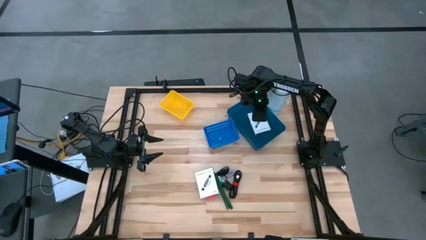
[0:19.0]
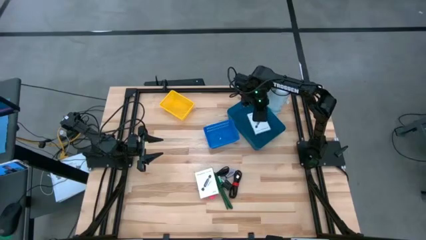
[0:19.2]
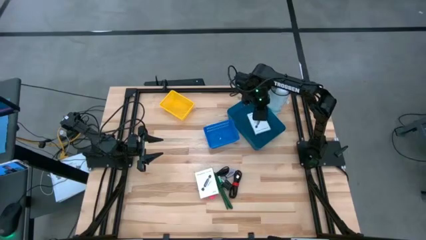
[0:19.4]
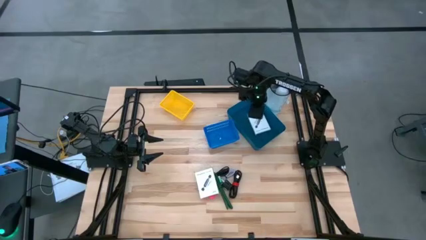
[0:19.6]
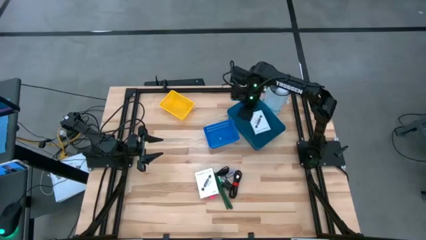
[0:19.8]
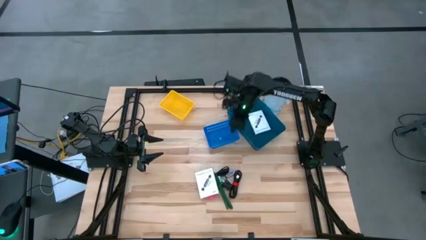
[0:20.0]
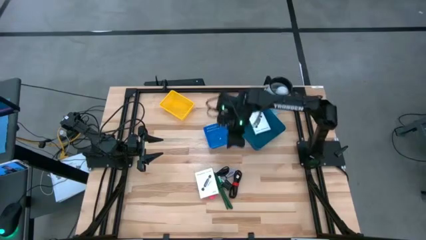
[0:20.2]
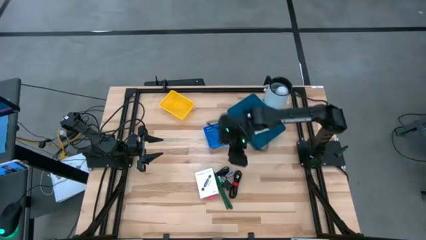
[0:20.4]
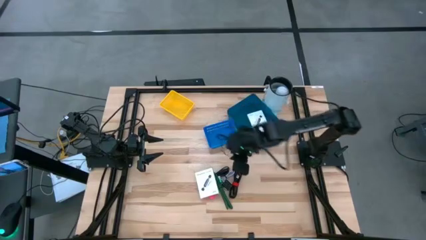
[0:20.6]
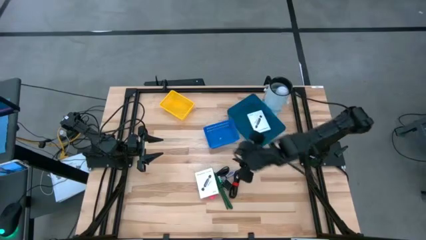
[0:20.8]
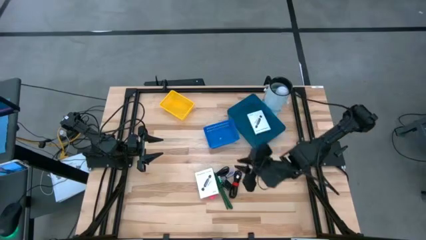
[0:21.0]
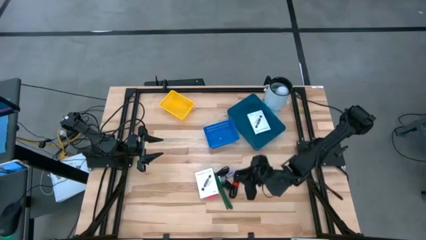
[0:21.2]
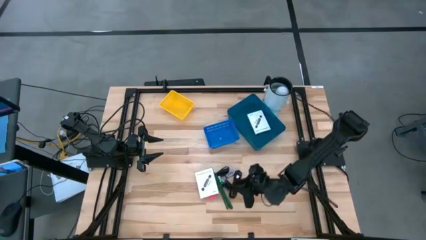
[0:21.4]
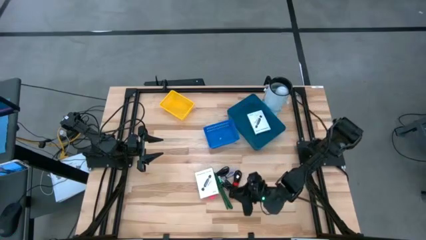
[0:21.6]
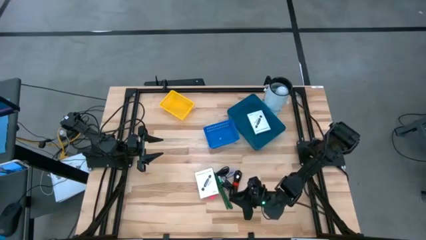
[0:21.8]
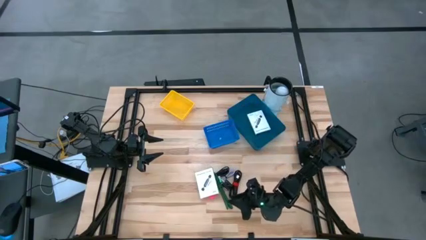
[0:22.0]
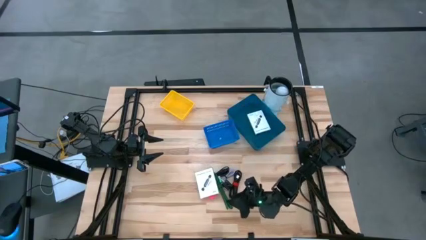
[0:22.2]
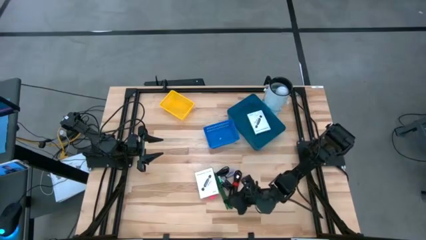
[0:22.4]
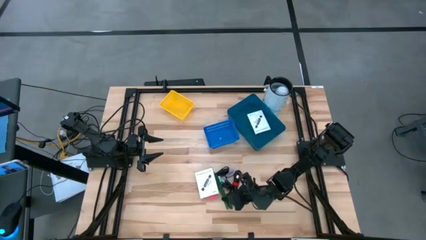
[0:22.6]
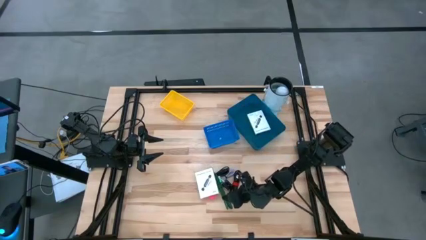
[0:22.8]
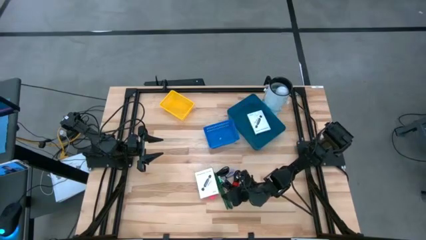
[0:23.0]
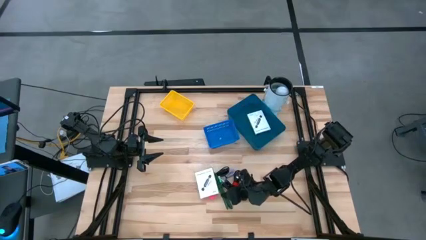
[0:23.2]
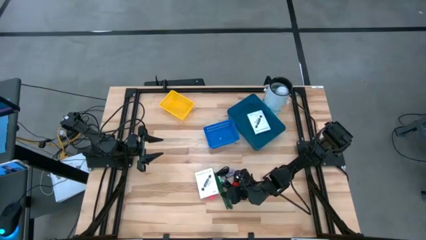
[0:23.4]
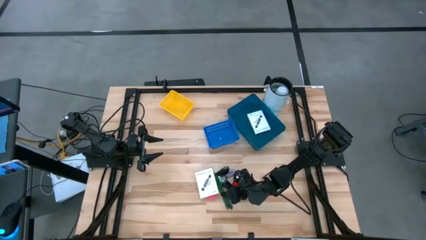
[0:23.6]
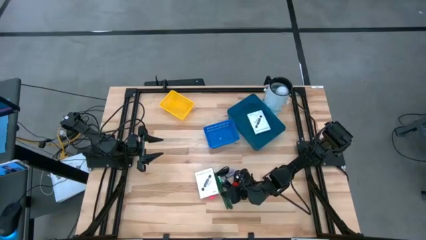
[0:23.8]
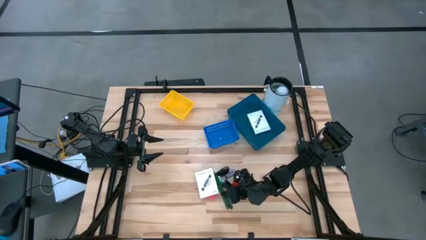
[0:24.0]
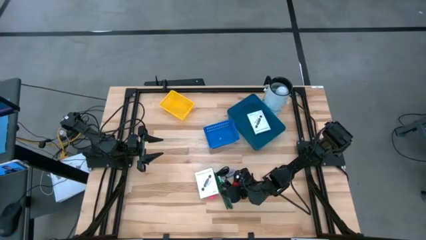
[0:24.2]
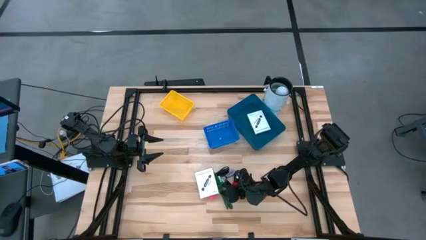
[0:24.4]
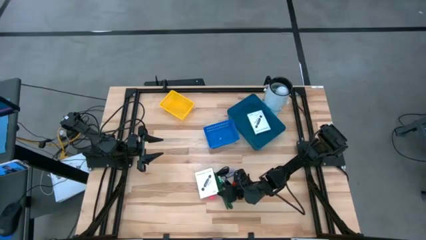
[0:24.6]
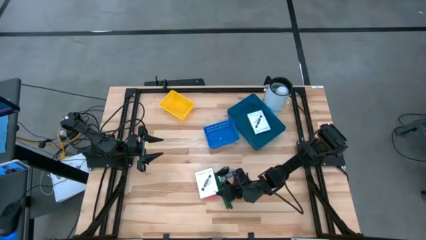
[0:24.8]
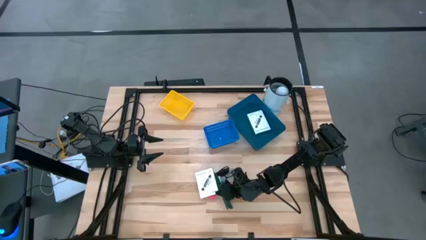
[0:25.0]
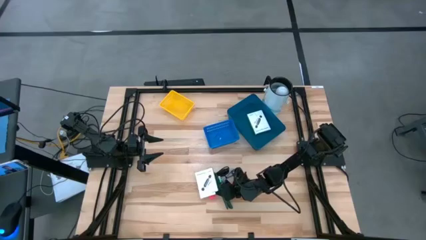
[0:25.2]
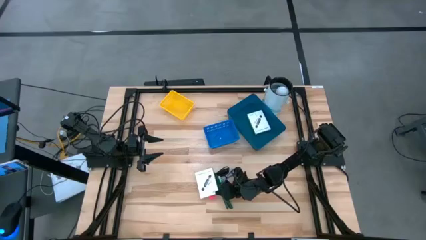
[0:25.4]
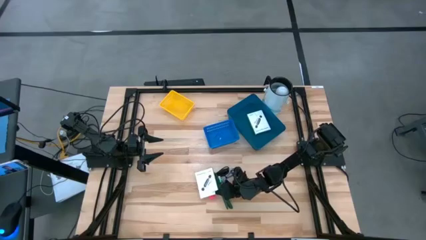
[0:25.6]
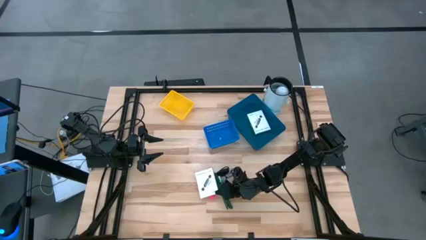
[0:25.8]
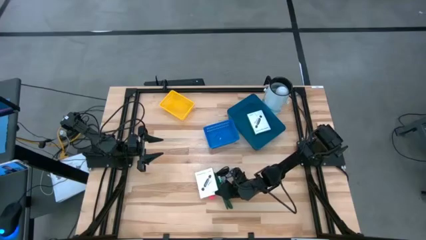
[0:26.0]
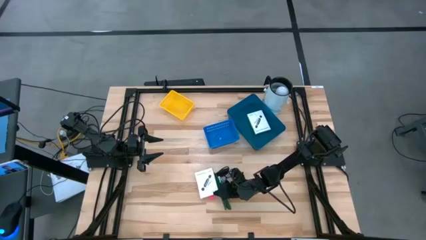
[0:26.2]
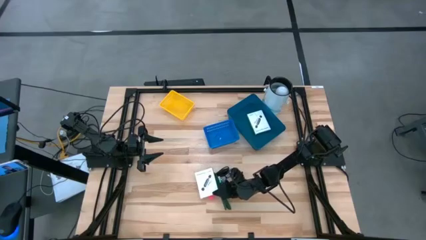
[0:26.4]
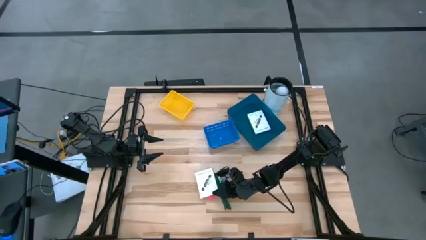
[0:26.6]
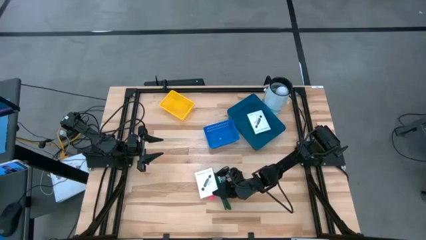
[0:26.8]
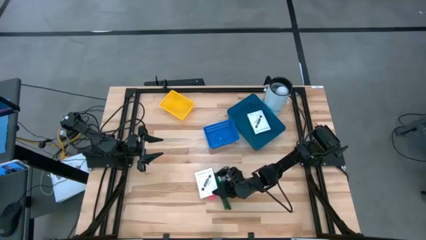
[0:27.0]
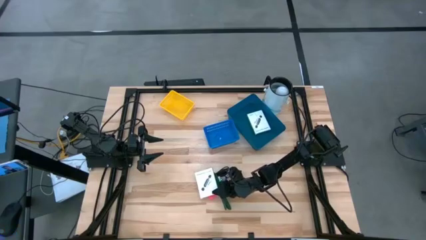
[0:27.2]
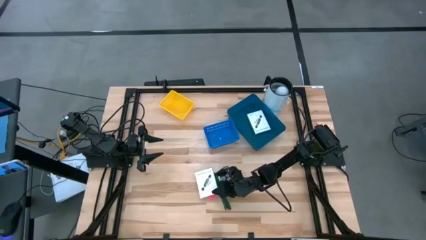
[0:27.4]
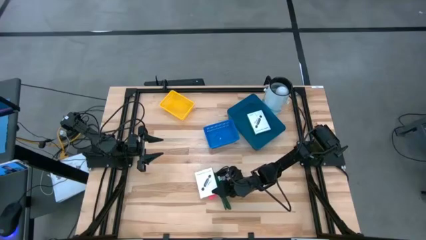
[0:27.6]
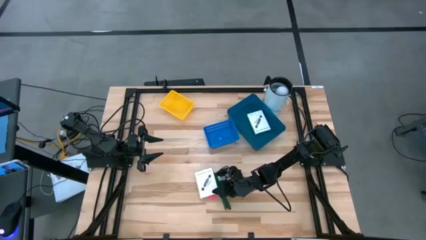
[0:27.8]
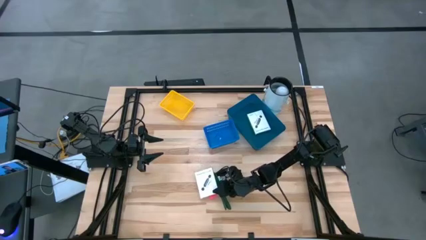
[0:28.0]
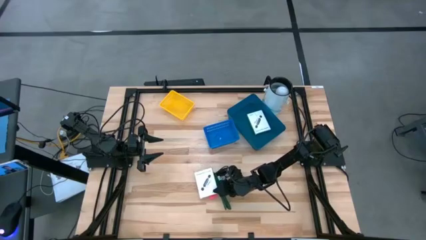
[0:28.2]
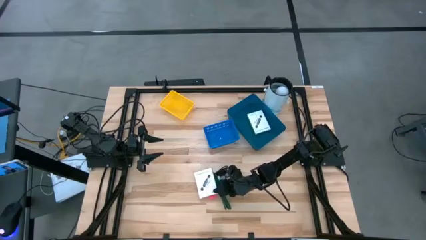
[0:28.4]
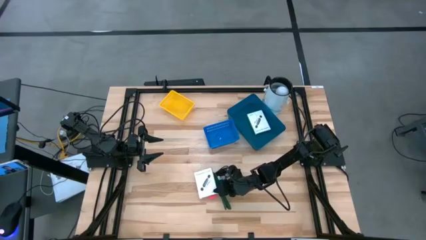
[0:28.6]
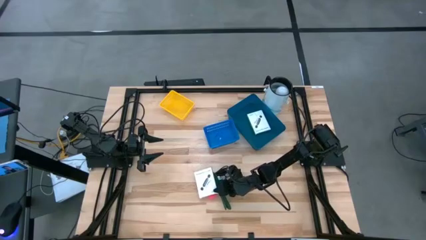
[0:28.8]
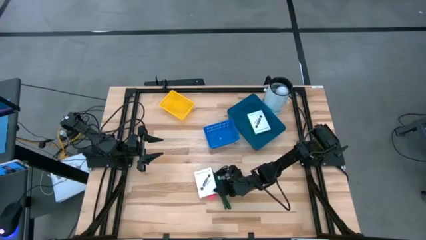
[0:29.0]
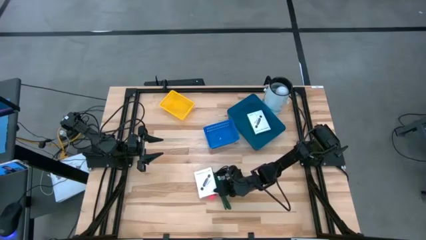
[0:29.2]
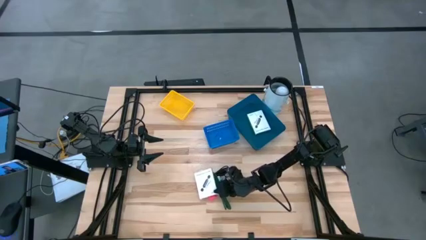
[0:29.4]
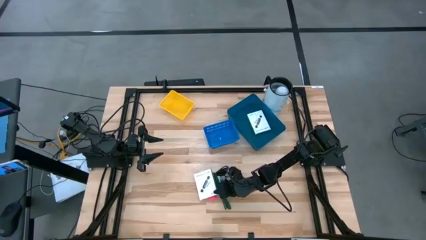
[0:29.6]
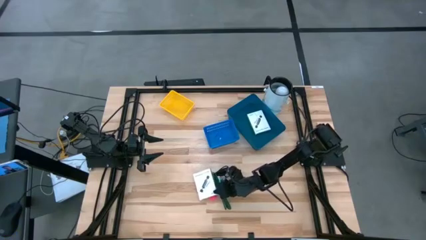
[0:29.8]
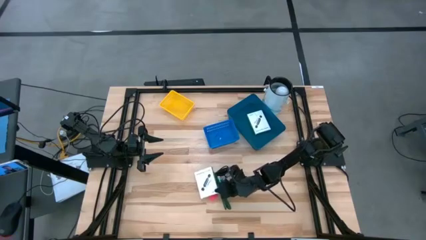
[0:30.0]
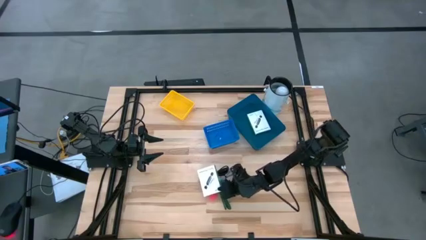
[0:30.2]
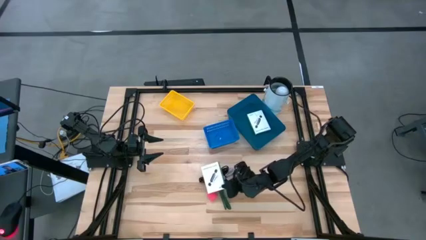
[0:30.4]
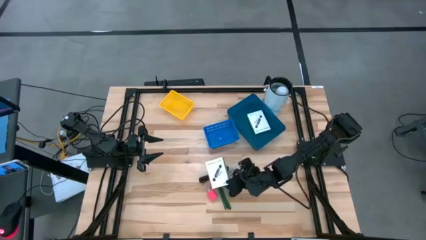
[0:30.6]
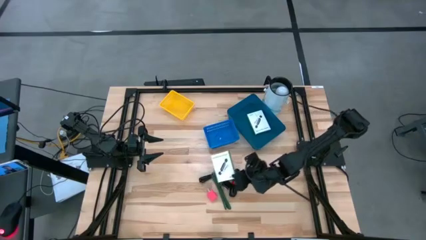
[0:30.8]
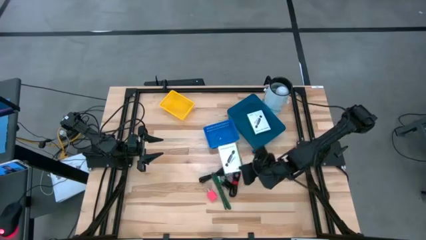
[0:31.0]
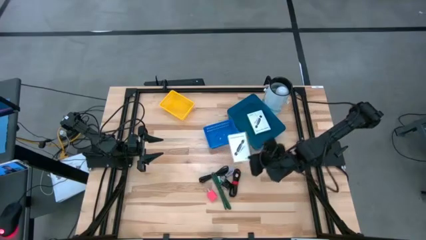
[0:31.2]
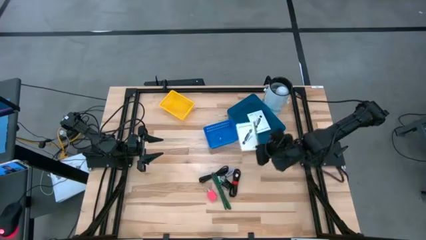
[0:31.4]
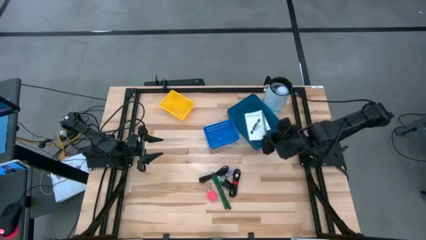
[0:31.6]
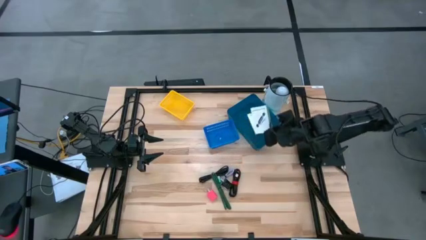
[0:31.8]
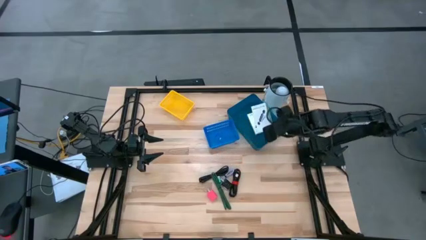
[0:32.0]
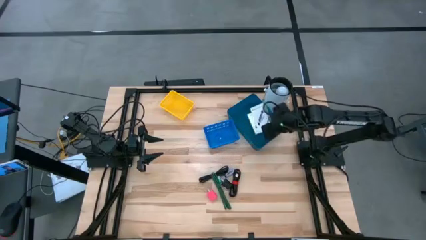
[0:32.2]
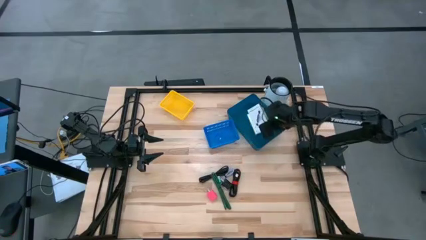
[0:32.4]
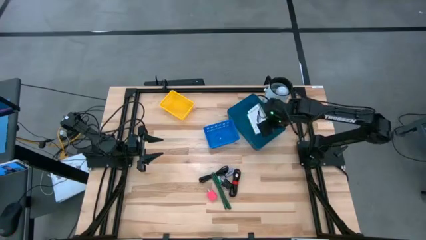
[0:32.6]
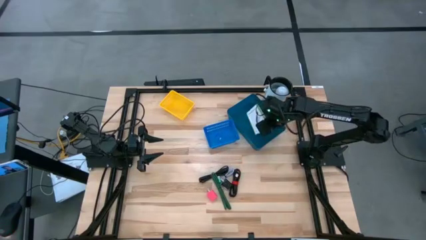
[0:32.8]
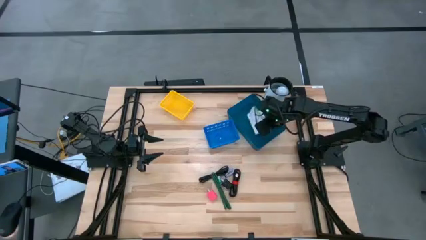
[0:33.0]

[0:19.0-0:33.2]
Task: Pick and place items into bin
Put the SD card reader box into the dark blue bin
